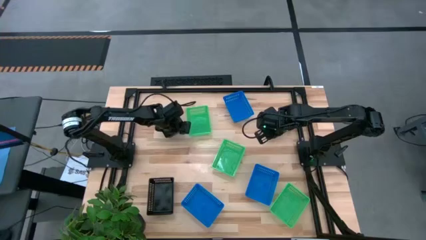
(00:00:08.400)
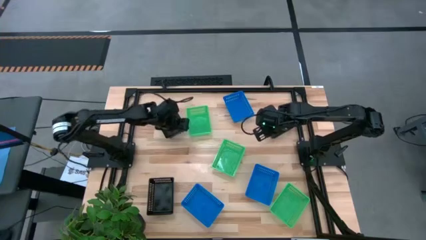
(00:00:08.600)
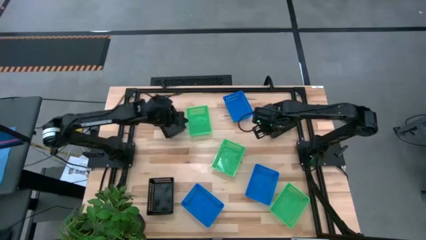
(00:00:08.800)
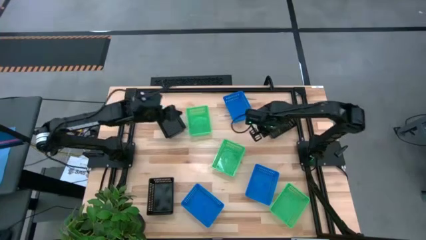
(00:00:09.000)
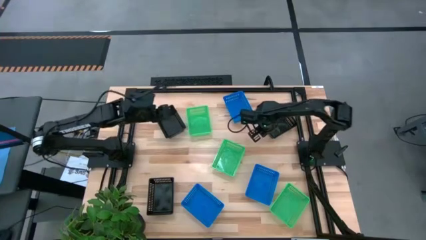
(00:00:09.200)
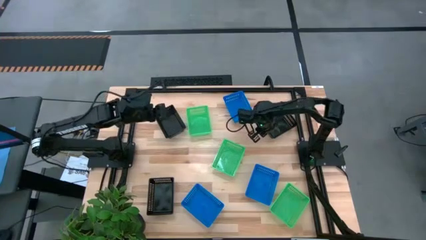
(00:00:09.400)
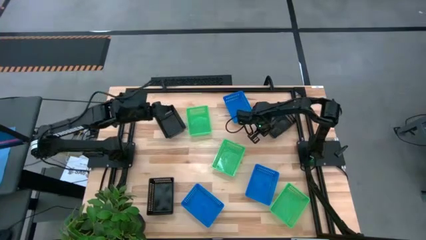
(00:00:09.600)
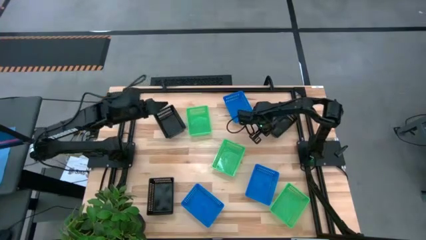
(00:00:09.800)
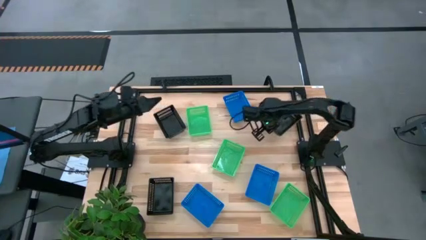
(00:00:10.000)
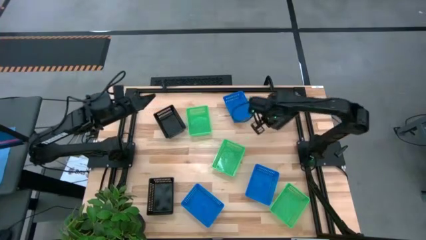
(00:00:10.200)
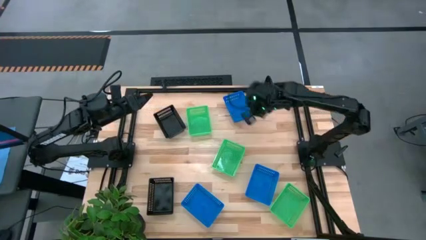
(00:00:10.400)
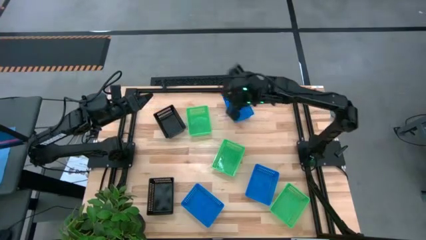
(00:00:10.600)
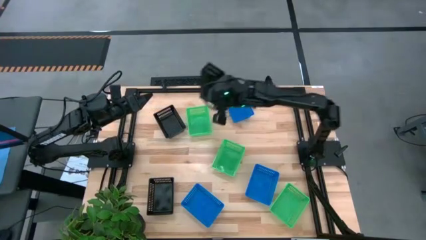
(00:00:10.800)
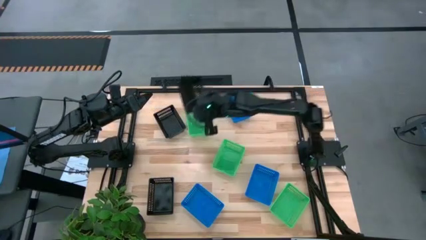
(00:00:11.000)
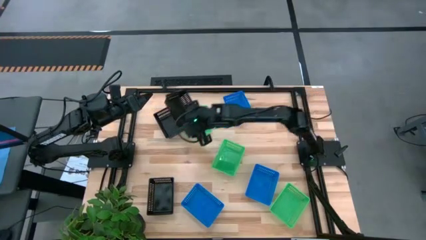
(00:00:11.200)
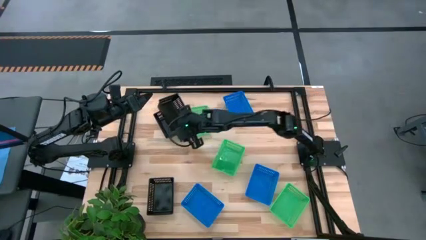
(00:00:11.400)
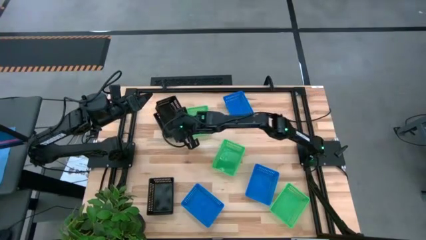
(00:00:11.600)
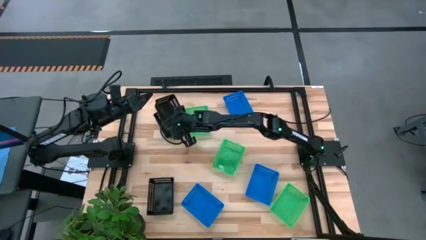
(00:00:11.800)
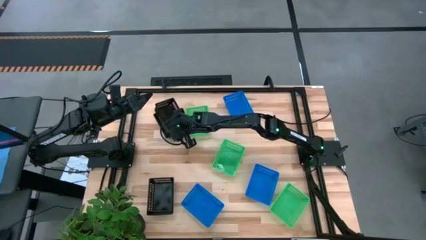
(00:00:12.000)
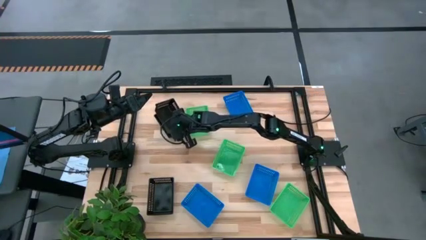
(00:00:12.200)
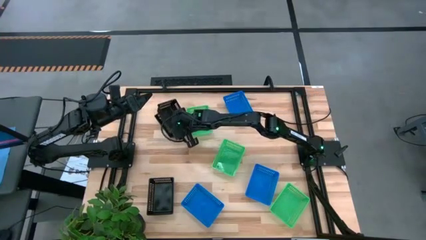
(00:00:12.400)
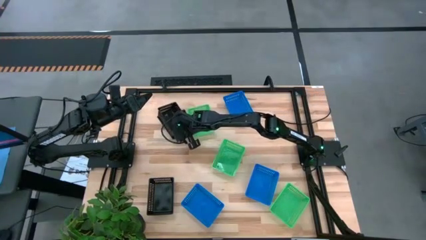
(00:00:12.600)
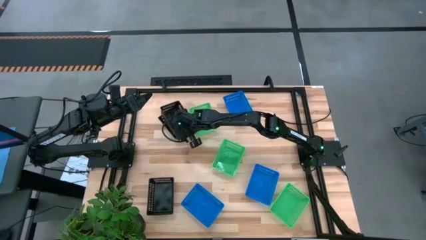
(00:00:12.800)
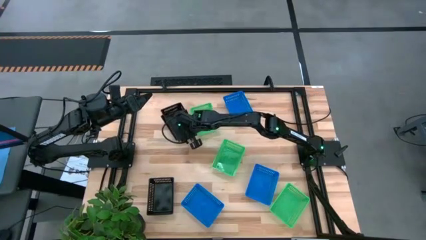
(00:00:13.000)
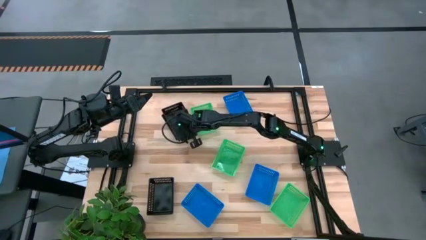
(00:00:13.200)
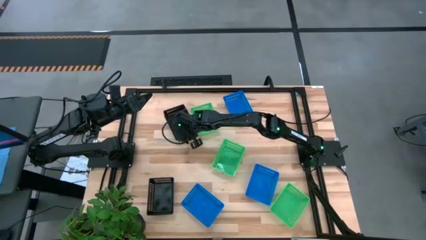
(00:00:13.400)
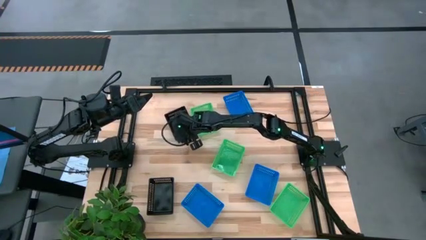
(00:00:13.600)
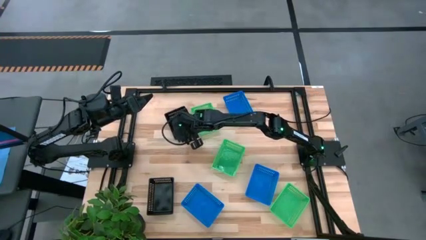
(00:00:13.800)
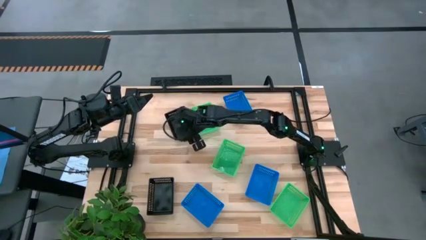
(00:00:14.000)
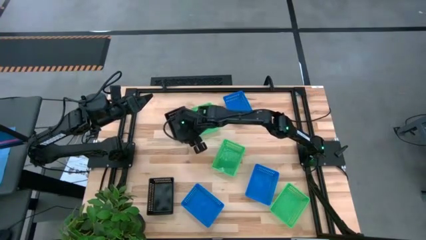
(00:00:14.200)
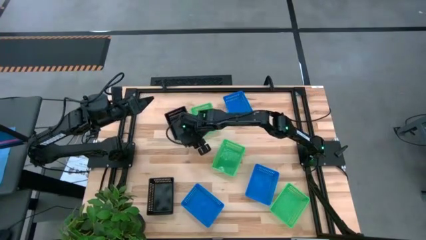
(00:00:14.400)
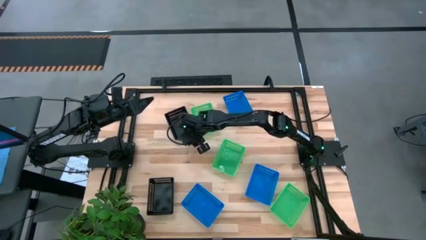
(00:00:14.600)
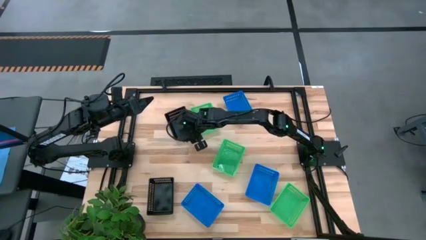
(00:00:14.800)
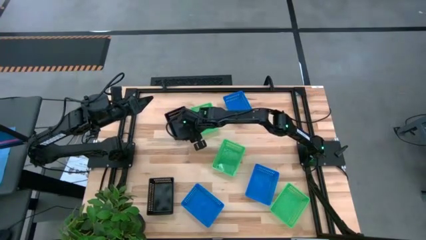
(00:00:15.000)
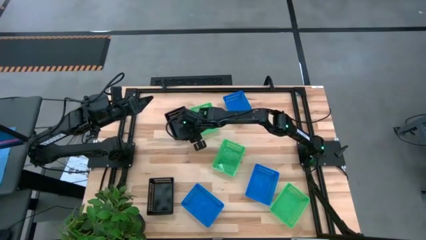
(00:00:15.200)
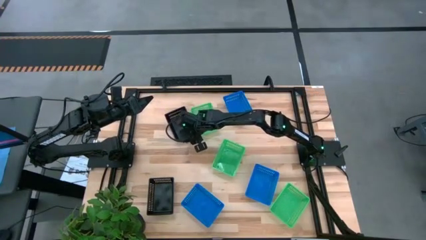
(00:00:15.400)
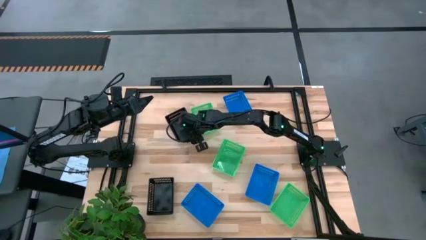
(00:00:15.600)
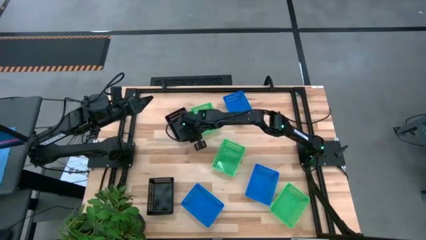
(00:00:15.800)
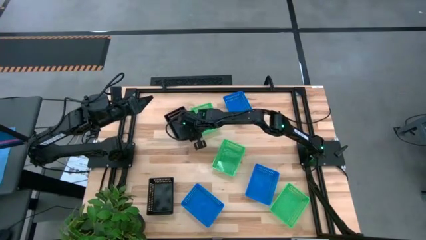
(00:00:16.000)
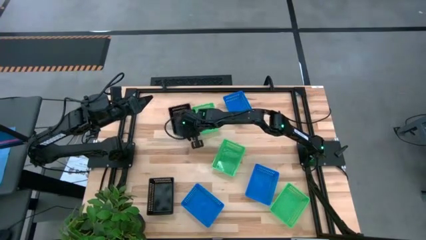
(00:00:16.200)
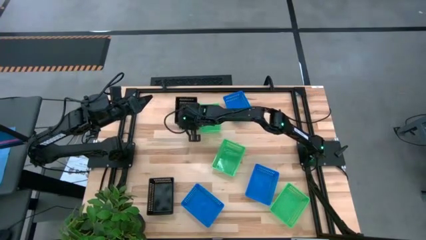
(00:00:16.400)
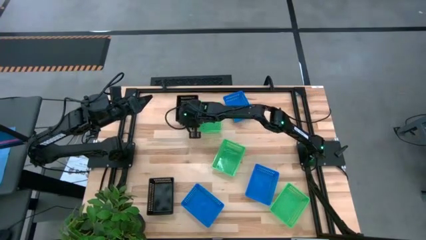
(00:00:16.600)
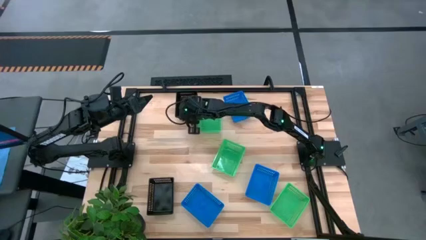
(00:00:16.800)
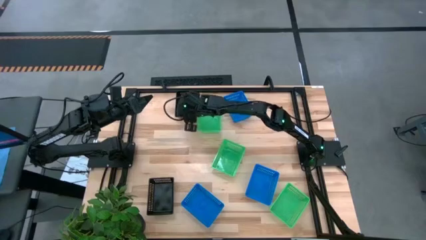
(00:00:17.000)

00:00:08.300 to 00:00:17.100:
Stack the top right black bin on top of the top black bin

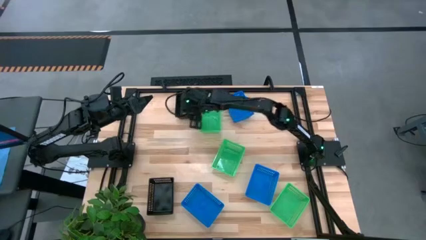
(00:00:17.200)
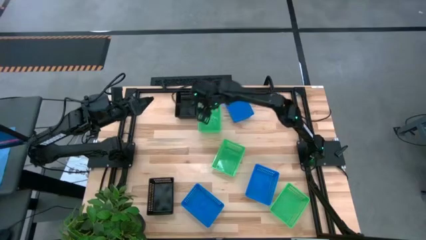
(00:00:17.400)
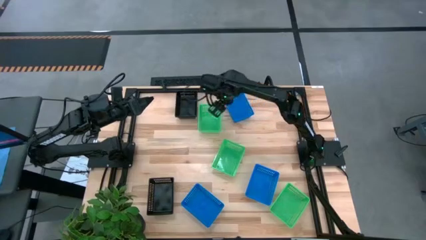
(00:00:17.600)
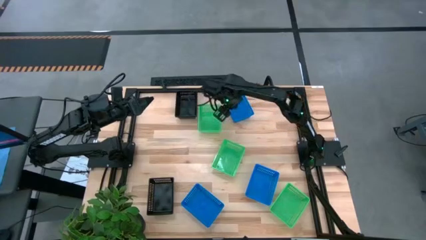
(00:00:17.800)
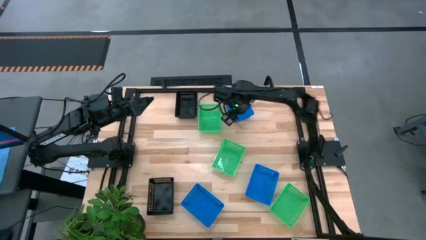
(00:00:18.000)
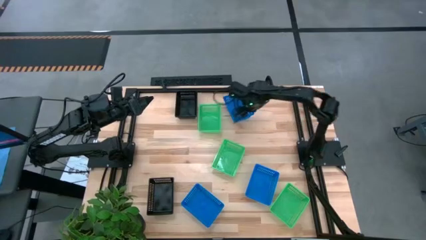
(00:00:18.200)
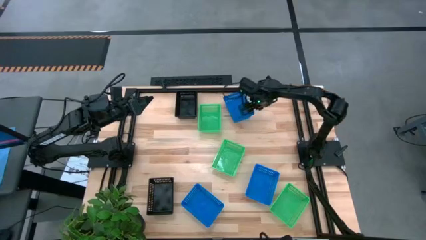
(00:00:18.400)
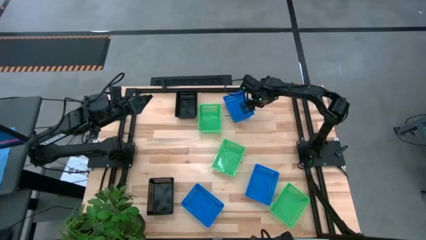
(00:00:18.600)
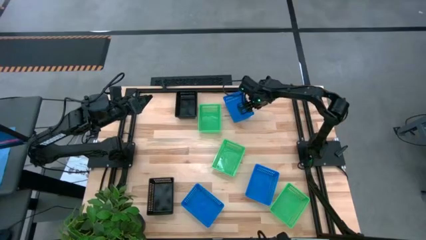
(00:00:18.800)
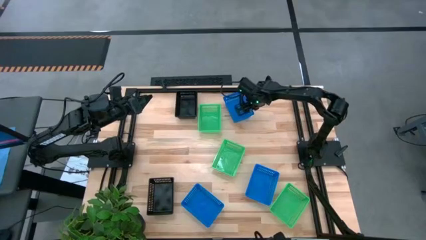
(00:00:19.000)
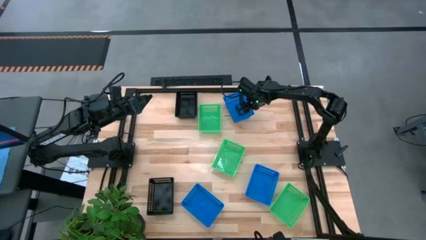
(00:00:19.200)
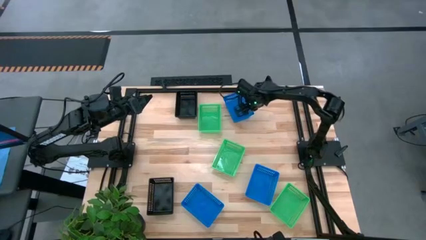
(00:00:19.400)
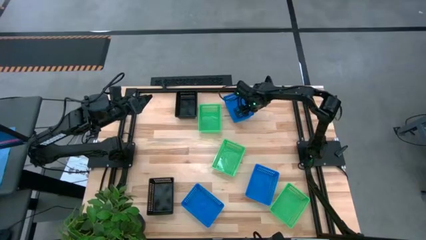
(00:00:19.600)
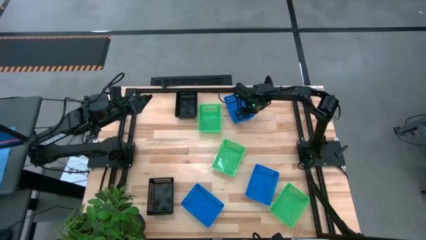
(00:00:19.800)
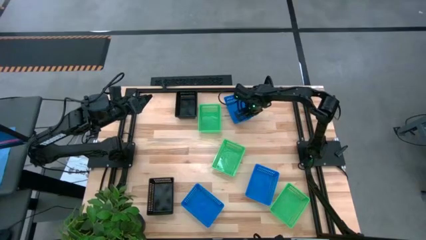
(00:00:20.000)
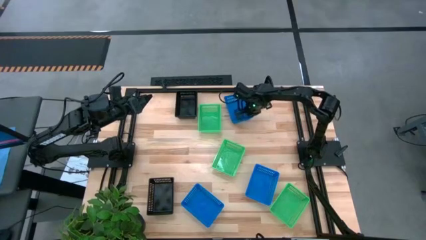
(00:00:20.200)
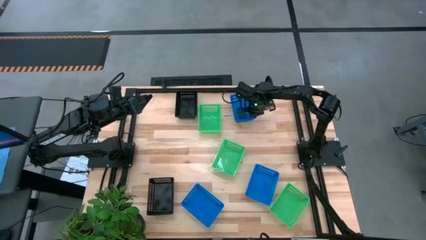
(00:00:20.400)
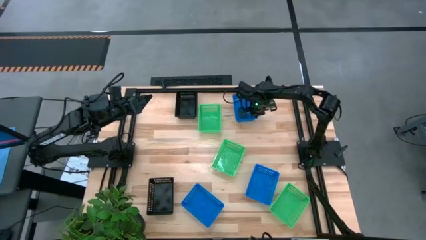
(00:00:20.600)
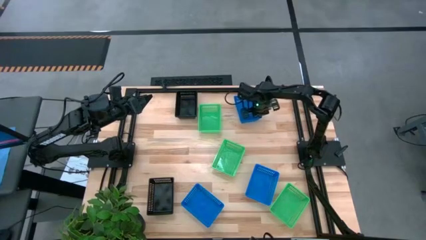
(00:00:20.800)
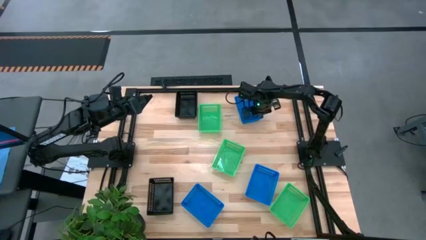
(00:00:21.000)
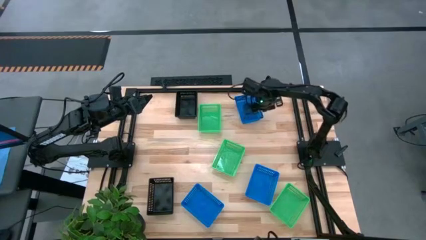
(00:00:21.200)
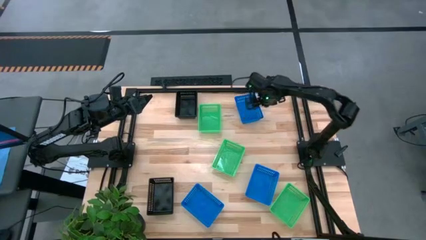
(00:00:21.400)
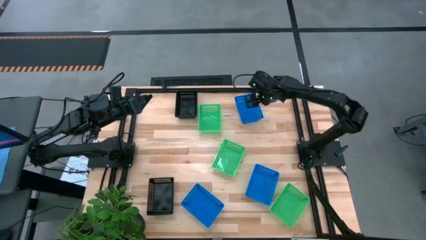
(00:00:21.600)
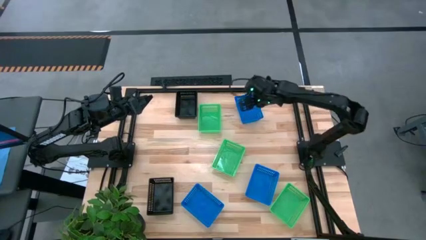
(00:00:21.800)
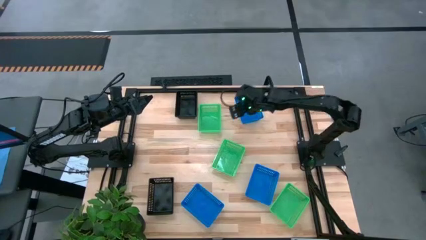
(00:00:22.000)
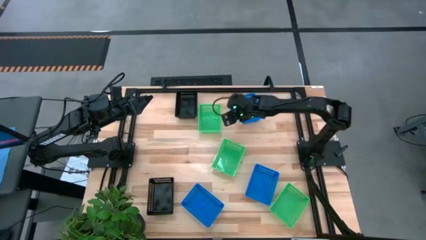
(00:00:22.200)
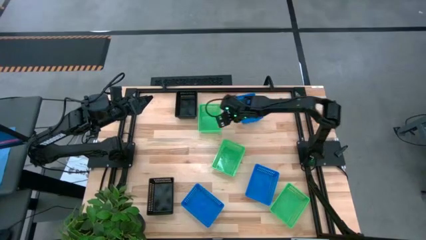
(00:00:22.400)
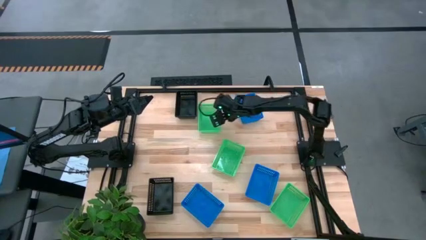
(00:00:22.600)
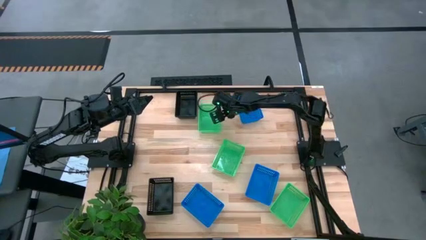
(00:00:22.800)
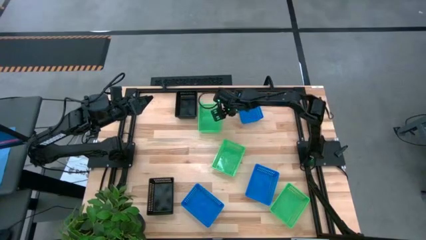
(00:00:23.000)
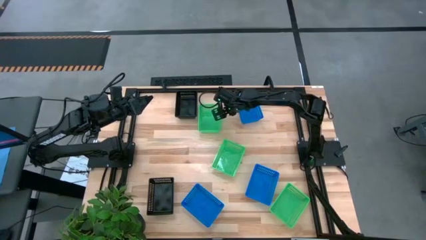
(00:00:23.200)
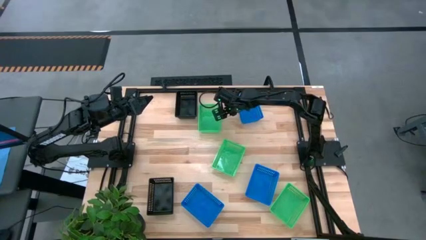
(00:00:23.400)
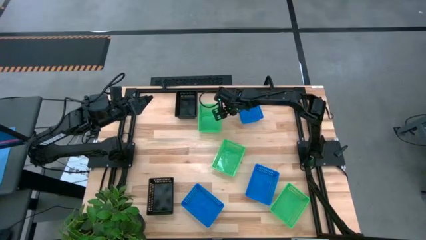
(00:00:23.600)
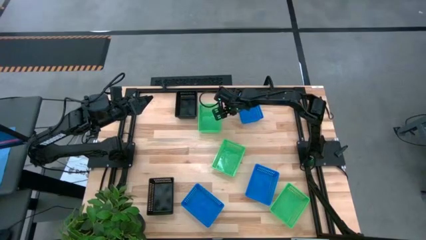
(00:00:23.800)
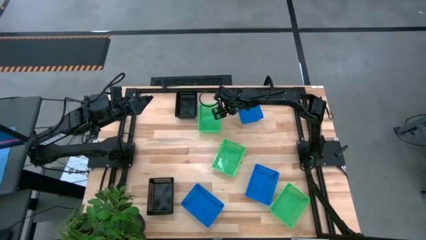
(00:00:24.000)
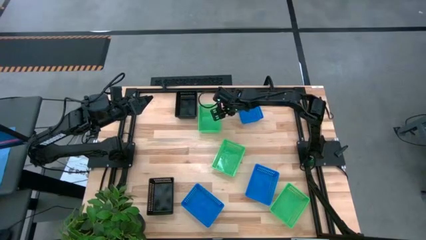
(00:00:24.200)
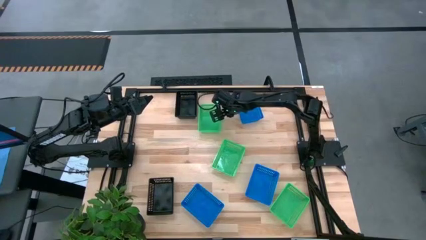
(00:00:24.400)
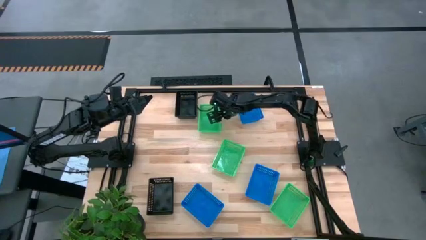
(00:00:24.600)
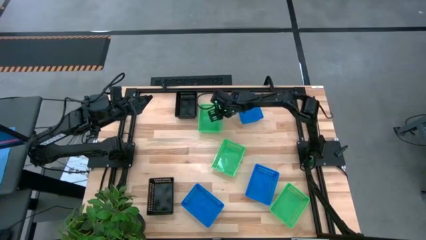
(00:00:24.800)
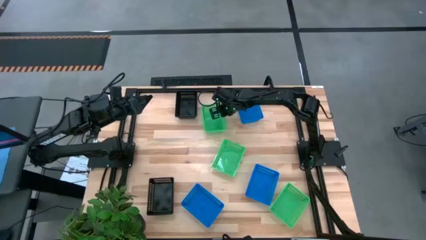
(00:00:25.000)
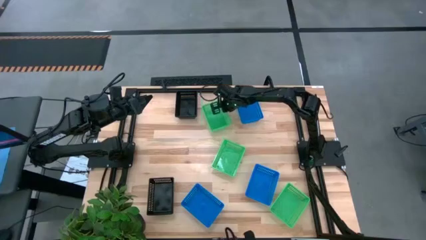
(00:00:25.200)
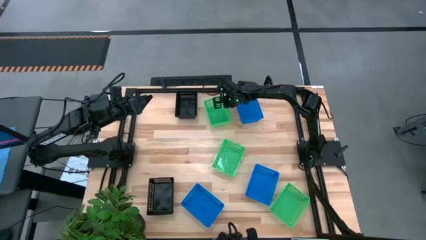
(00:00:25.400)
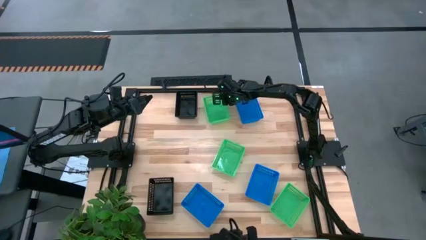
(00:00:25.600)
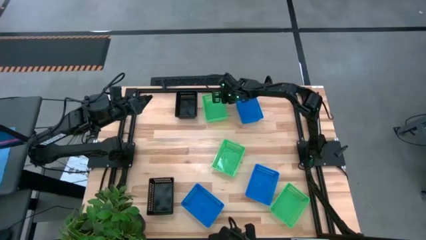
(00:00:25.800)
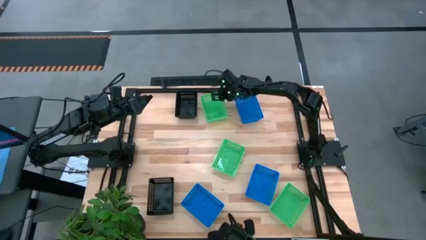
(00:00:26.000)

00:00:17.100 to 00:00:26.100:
Adjust the bins
